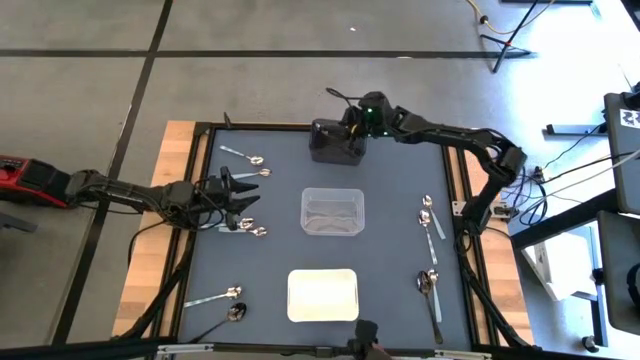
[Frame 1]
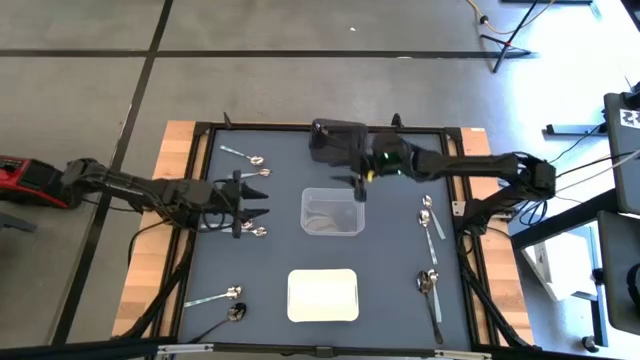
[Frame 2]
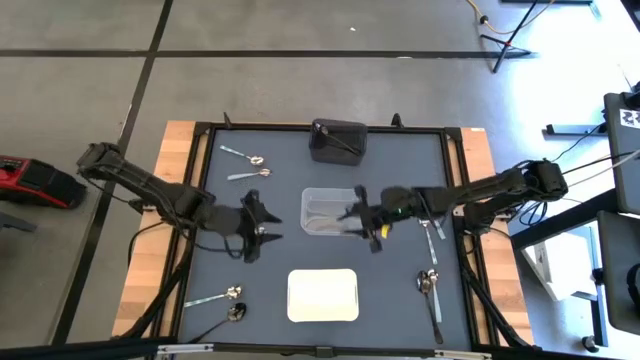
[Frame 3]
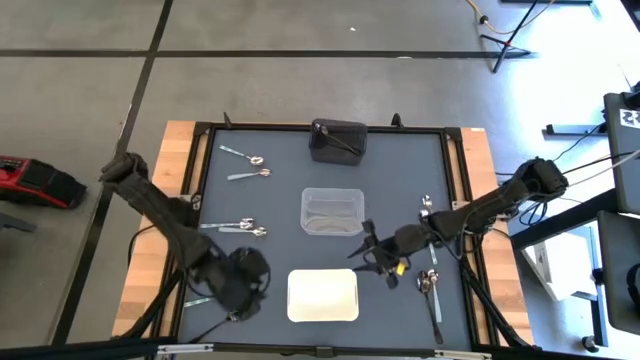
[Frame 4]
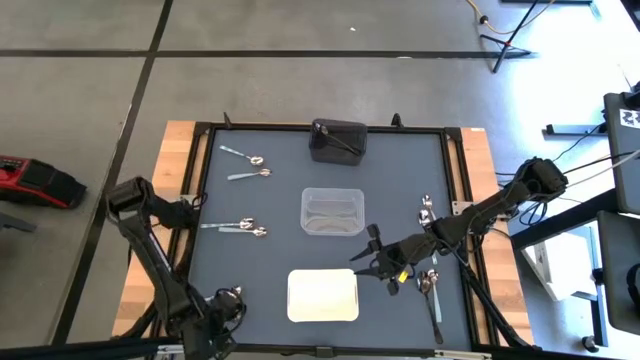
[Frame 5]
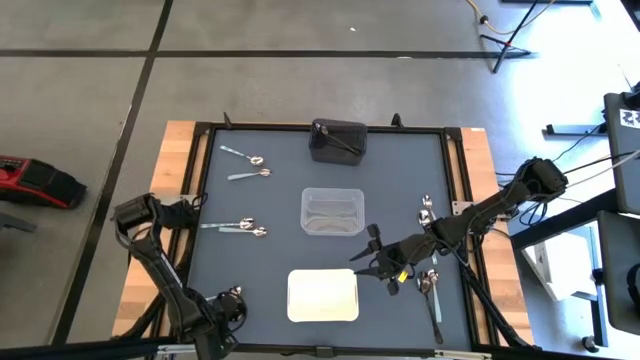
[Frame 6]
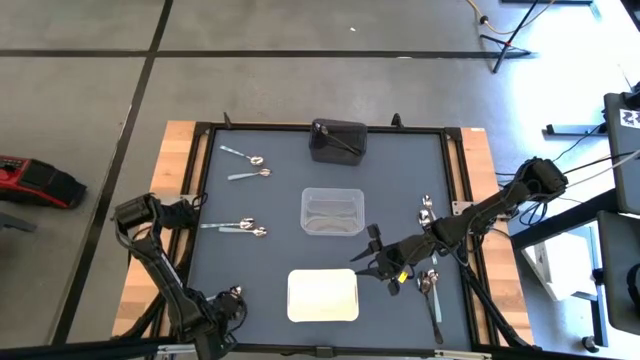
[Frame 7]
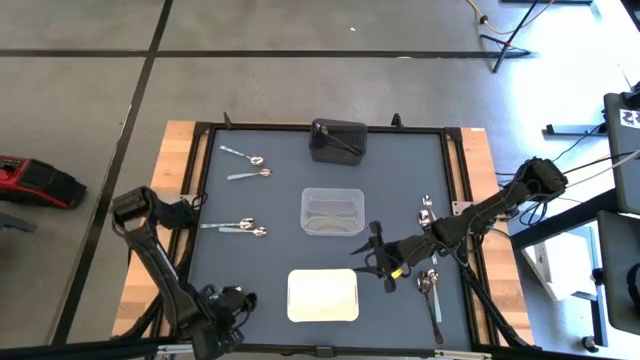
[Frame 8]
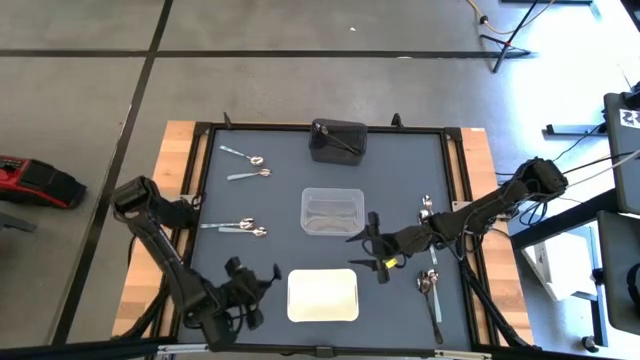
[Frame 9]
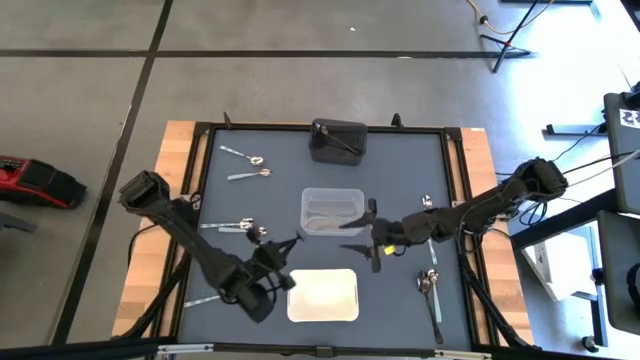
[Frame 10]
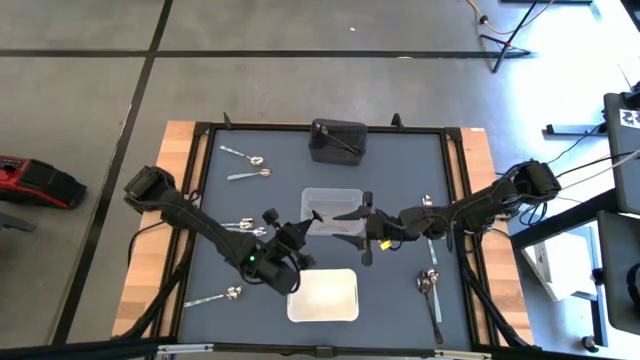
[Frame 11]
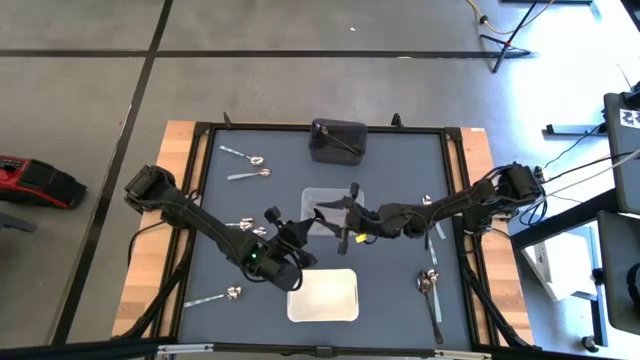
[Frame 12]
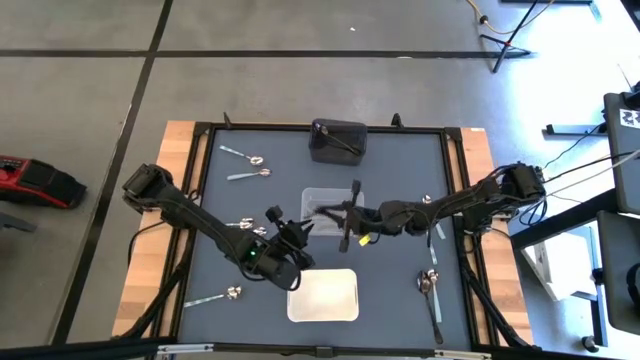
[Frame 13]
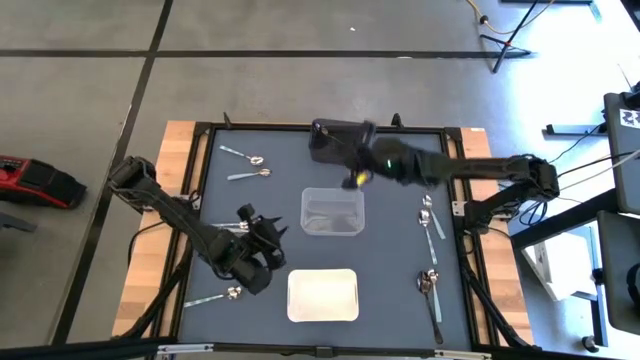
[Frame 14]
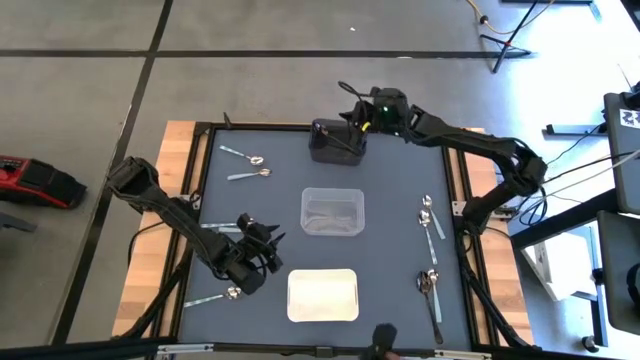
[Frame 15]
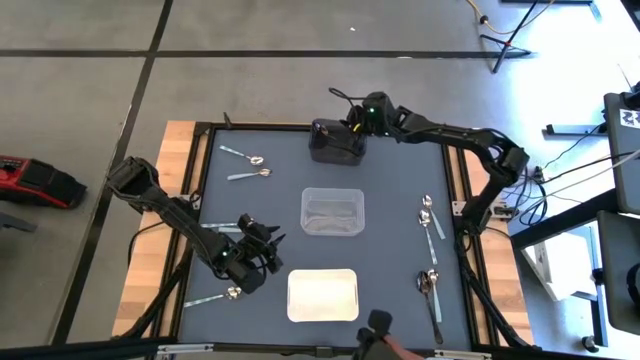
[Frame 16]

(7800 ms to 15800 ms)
Task: Sort silverware by color (type)
Put the left black spoon into the black bin

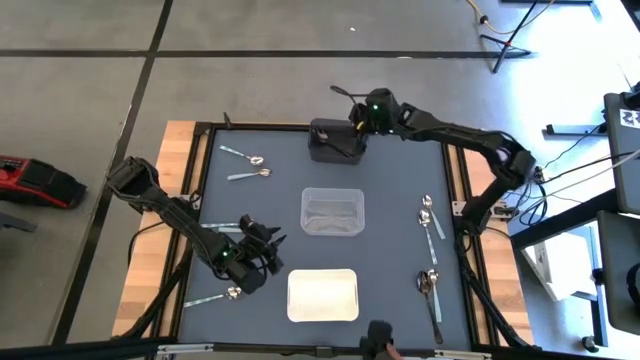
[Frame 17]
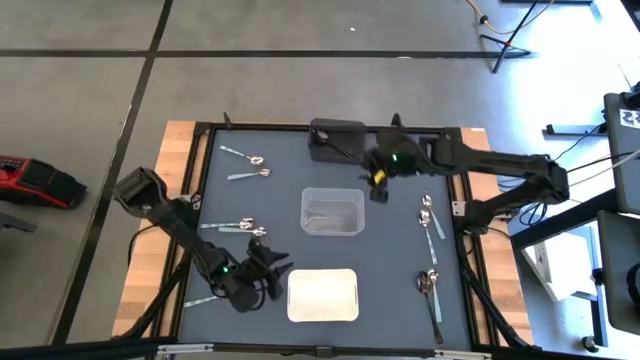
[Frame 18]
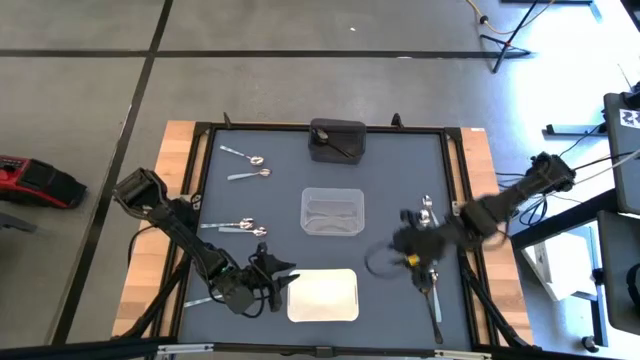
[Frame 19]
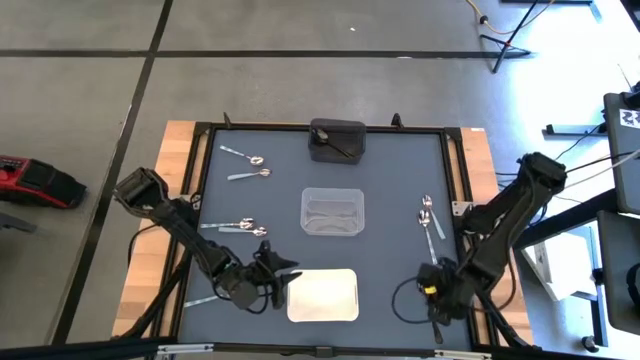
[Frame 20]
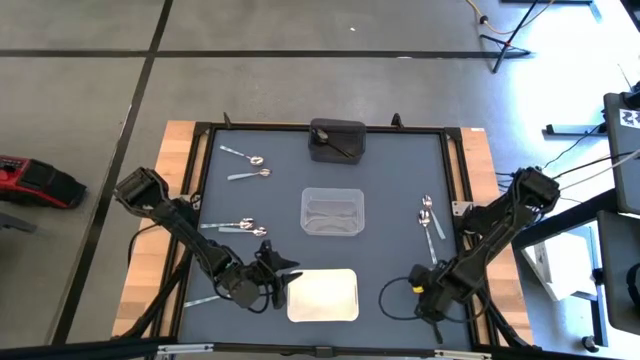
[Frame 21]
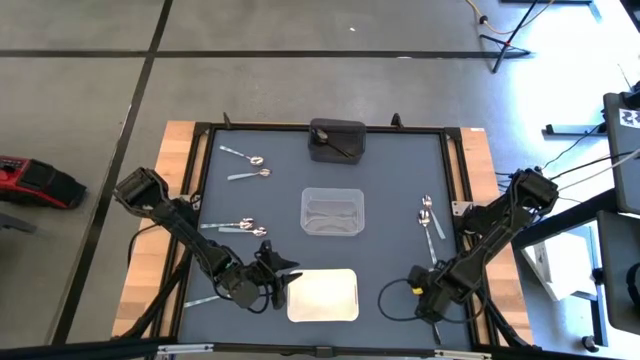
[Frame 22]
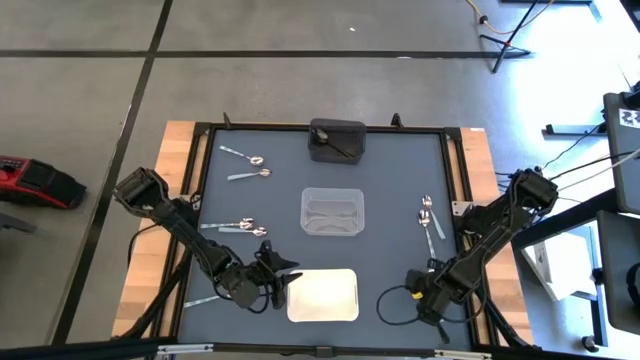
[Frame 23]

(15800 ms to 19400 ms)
Put the black spoon into the black bin

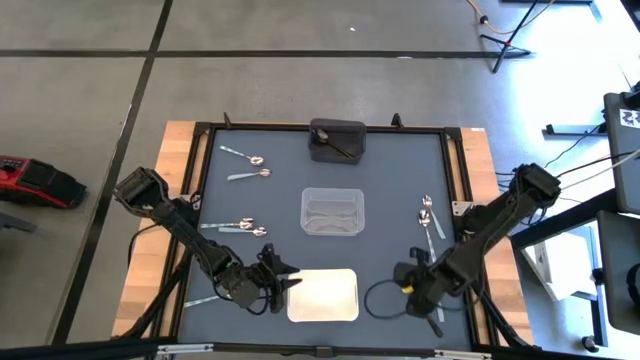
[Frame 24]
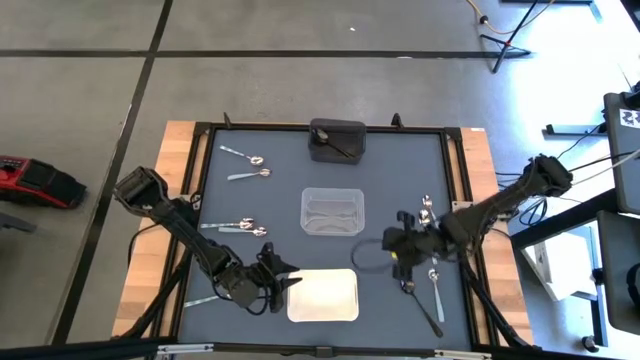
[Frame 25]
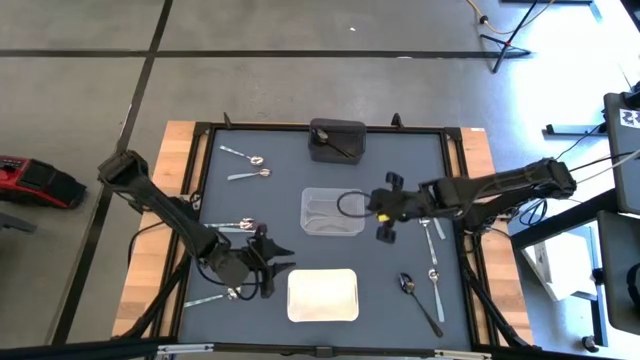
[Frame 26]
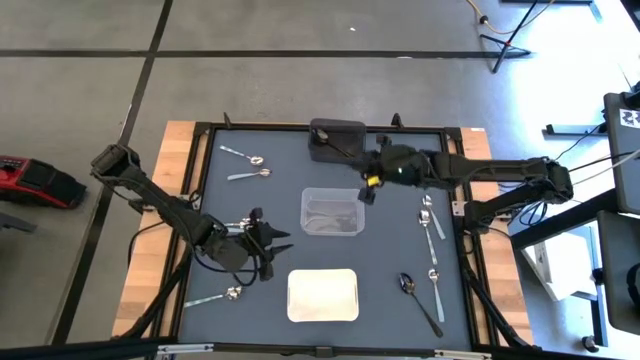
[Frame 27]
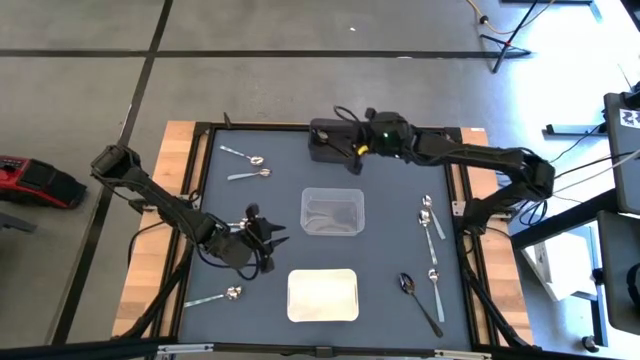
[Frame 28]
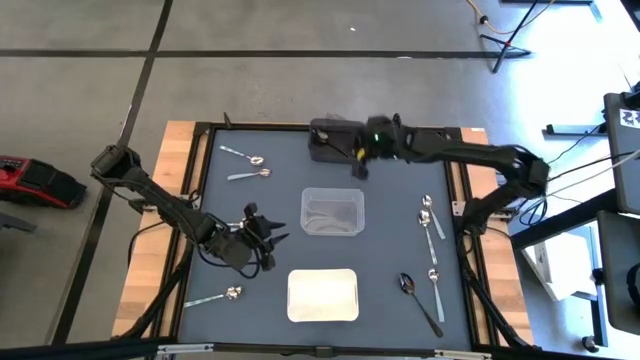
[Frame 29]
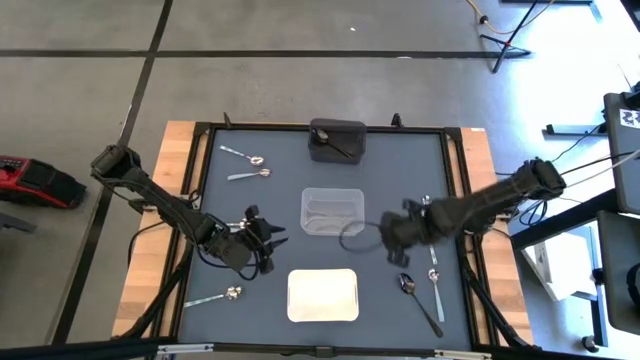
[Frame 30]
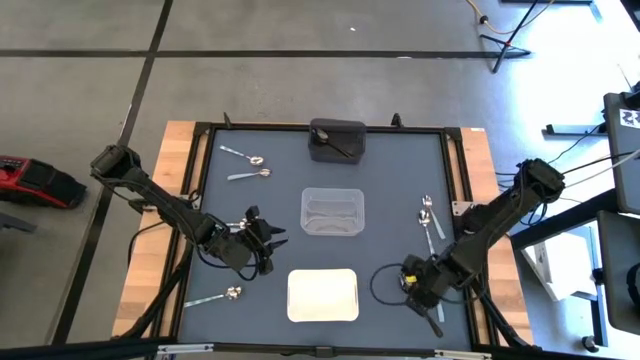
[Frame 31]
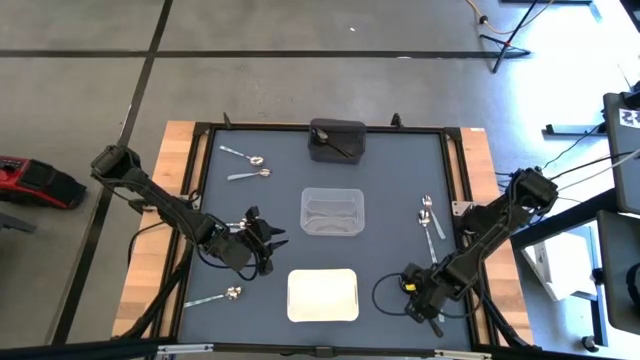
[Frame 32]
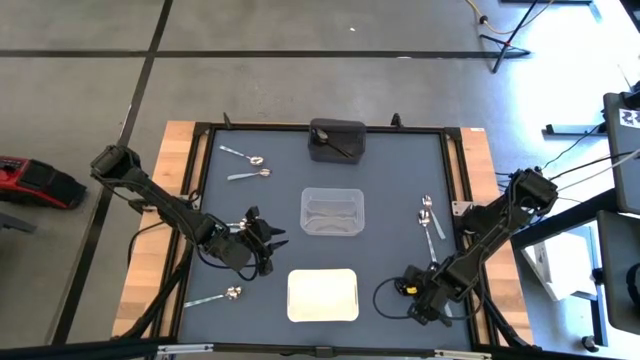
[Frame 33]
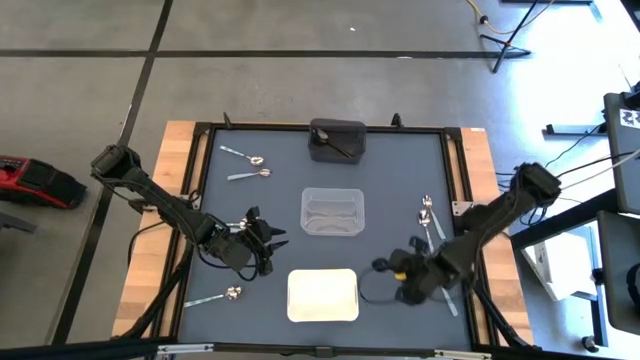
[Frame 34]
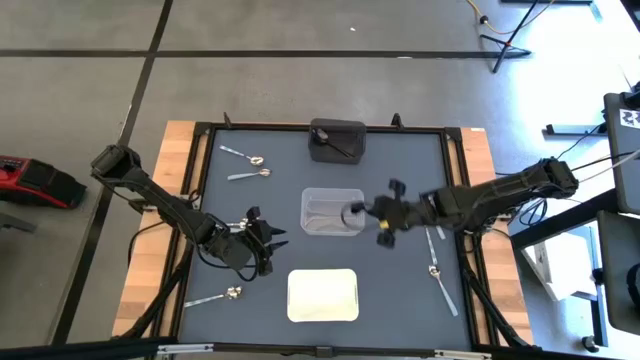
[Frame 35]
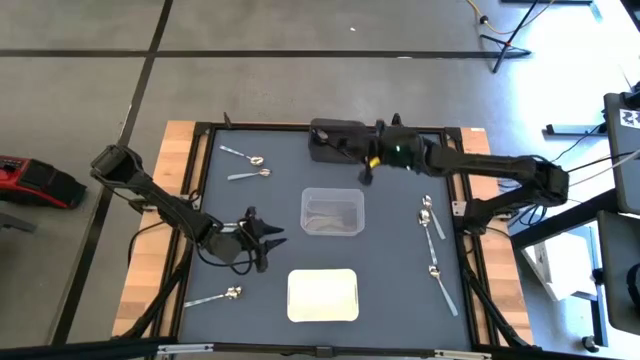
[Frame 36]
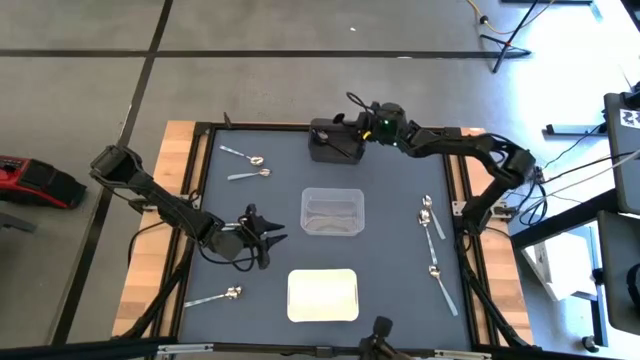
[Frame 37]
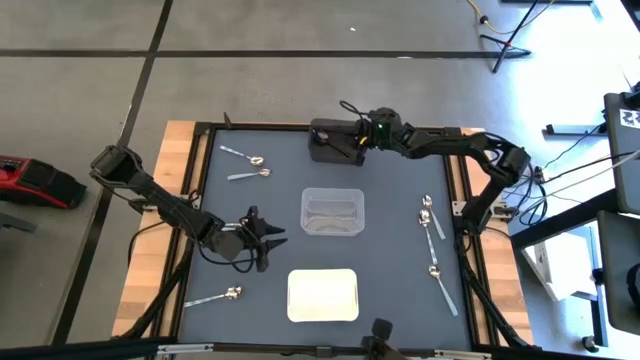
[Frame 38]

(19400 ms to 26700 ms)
Put the black spoon into the black bin

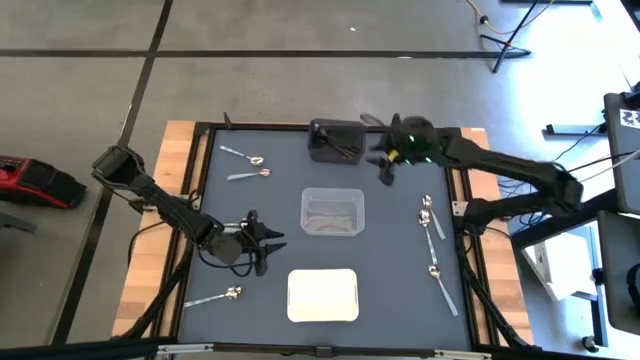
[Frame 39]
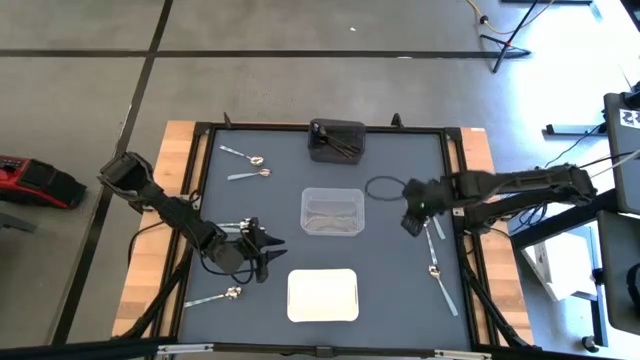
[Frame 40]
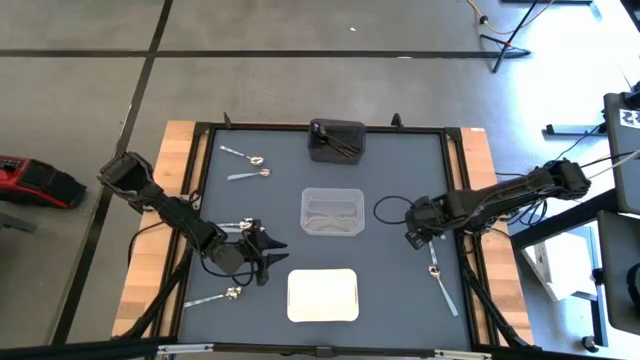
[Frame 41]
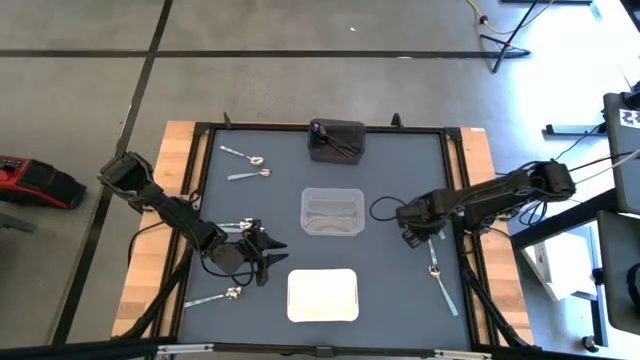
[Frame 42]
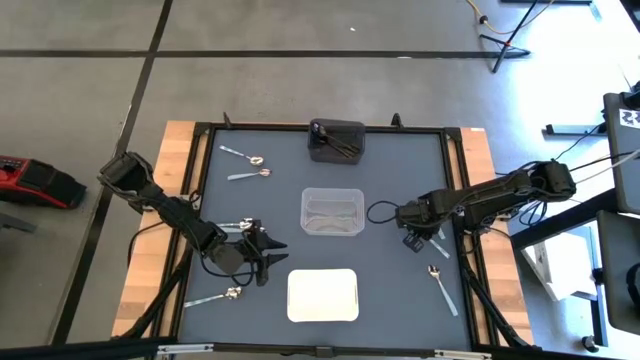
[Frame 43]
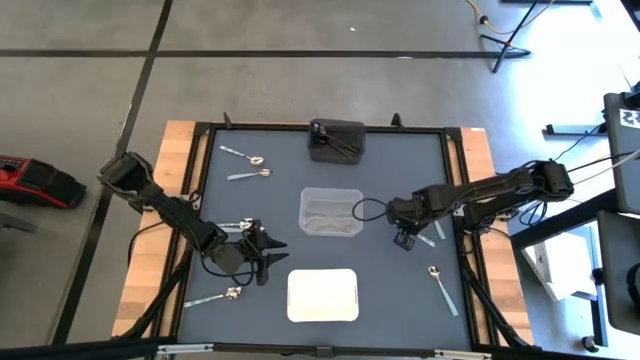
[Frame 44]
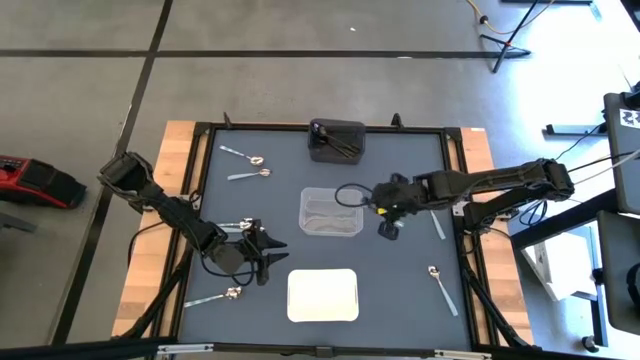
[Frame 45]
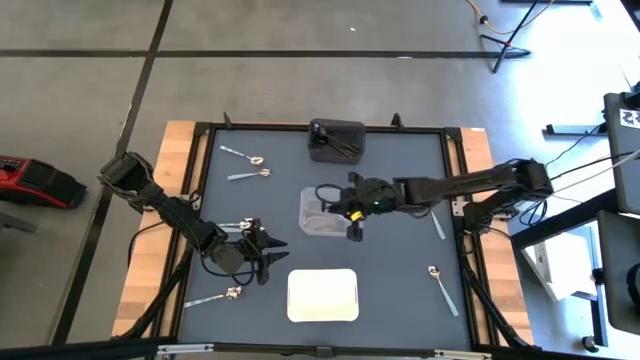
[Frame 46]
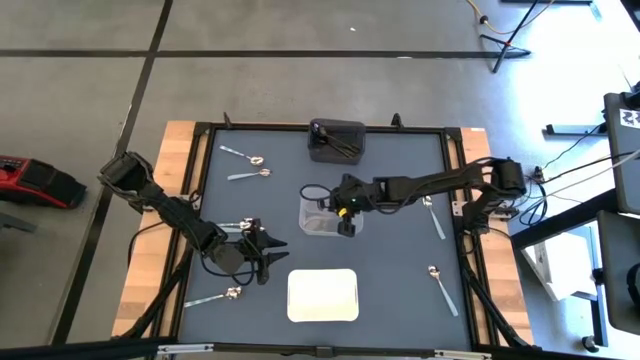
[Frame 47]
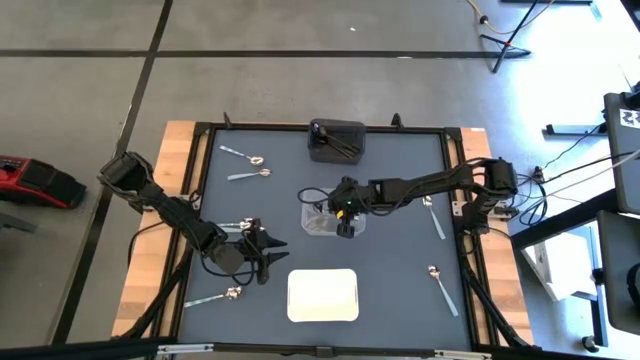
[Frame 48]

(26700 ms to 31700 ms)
Put the middle right green patterned spoon into the transparent bin
